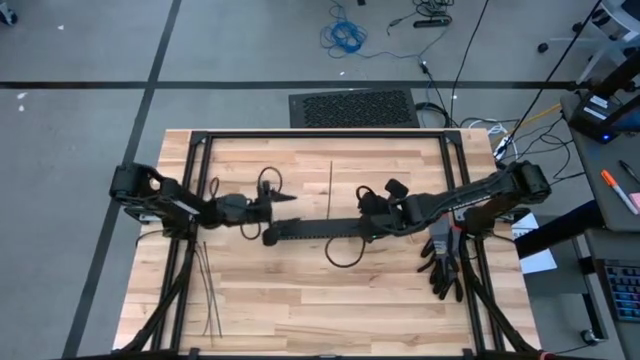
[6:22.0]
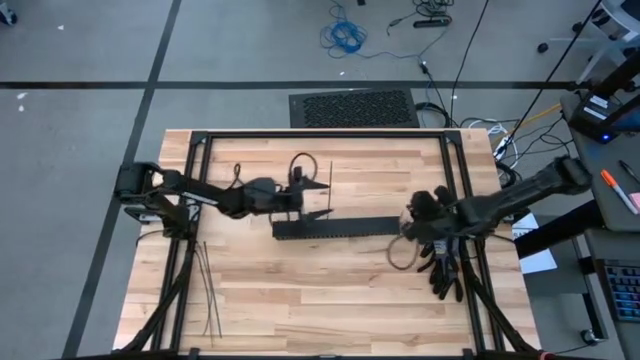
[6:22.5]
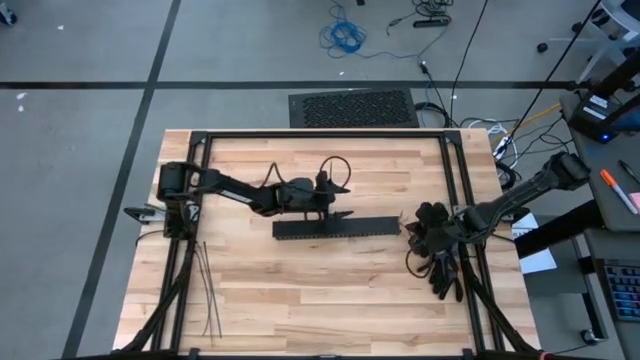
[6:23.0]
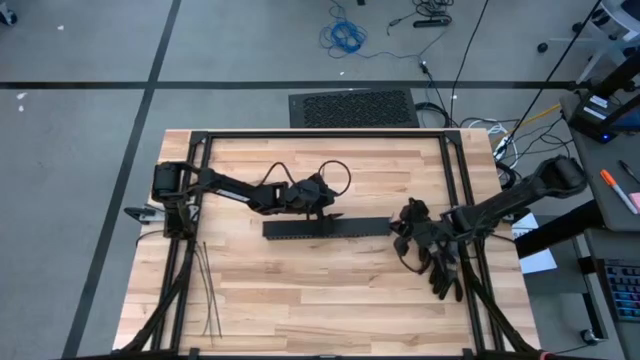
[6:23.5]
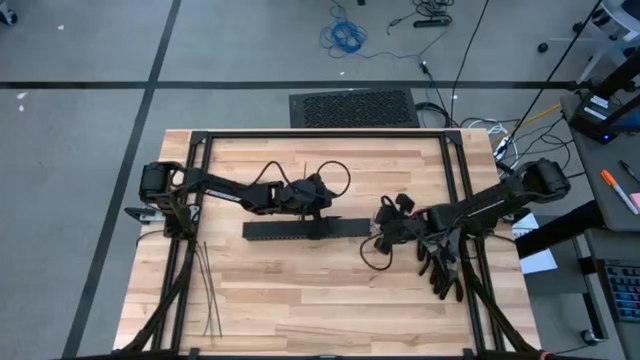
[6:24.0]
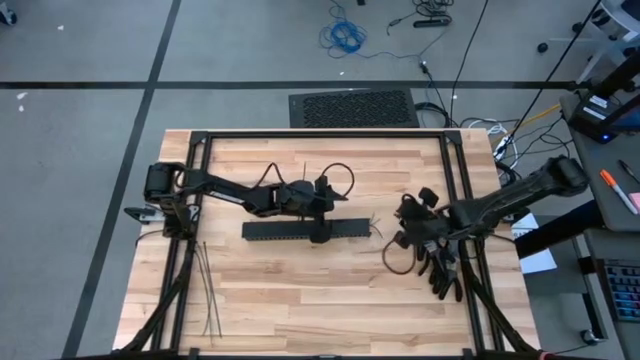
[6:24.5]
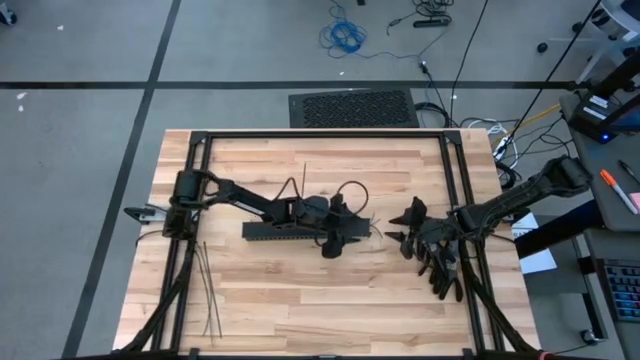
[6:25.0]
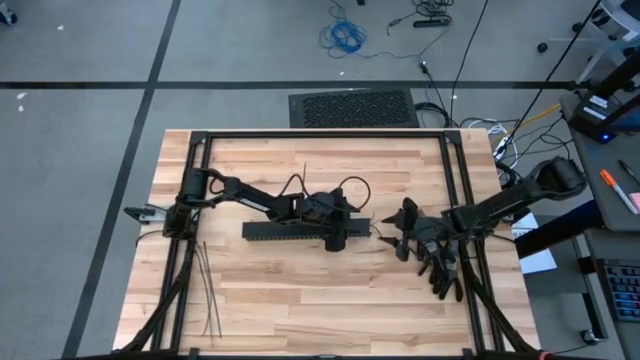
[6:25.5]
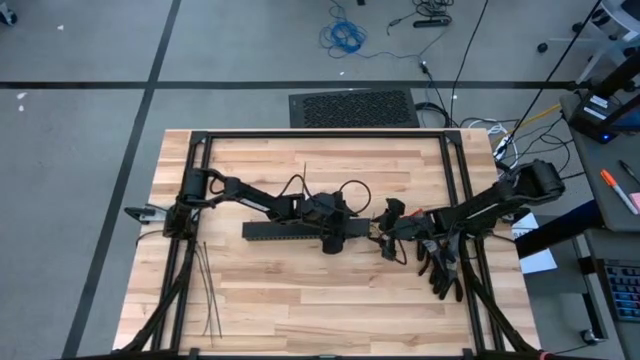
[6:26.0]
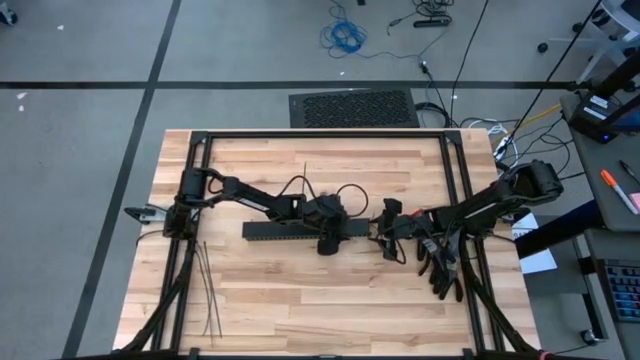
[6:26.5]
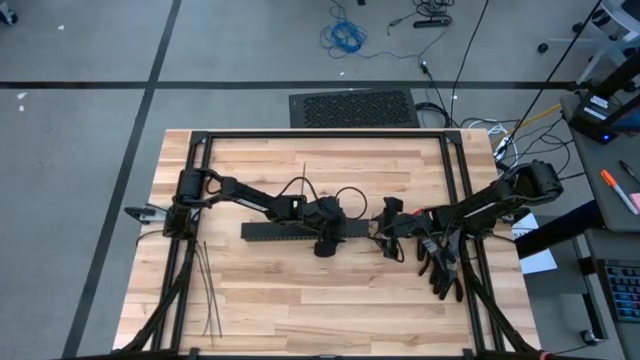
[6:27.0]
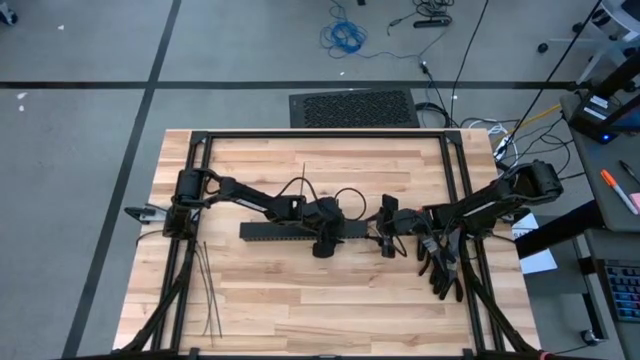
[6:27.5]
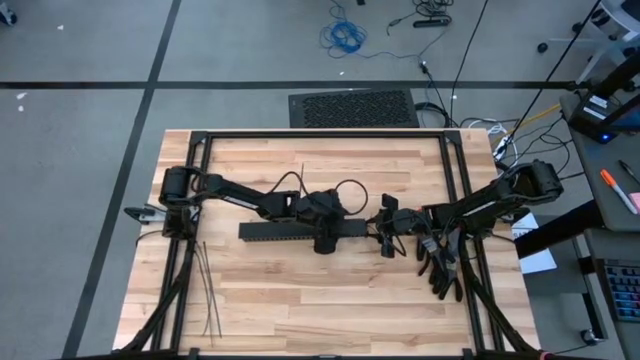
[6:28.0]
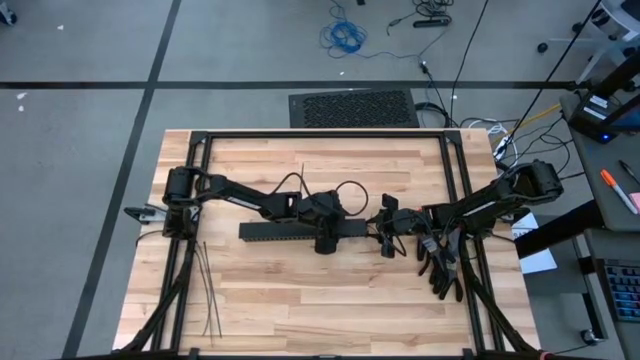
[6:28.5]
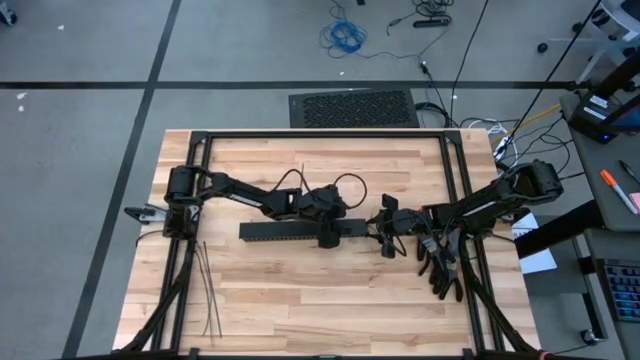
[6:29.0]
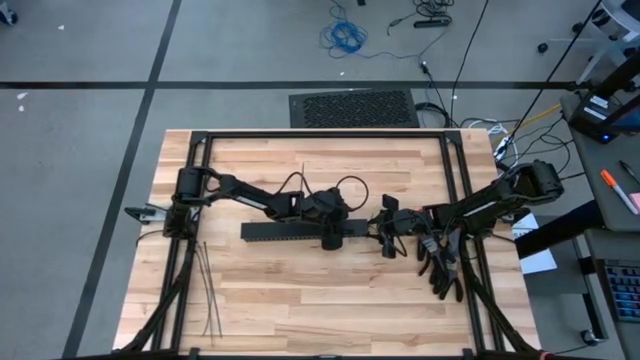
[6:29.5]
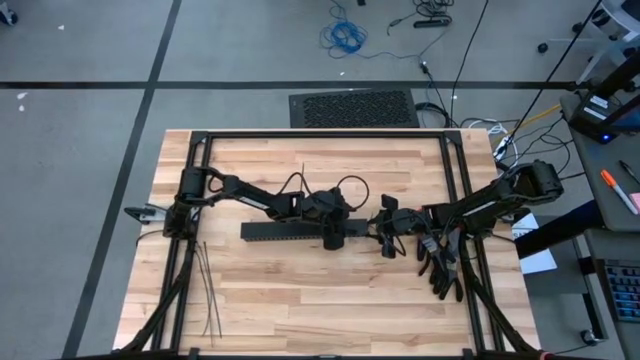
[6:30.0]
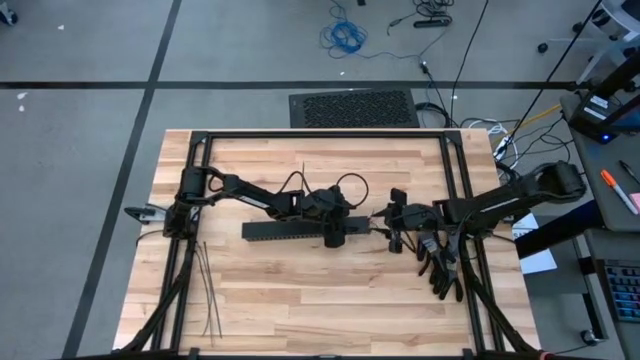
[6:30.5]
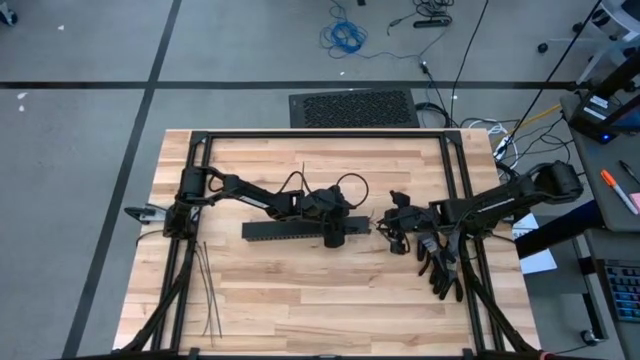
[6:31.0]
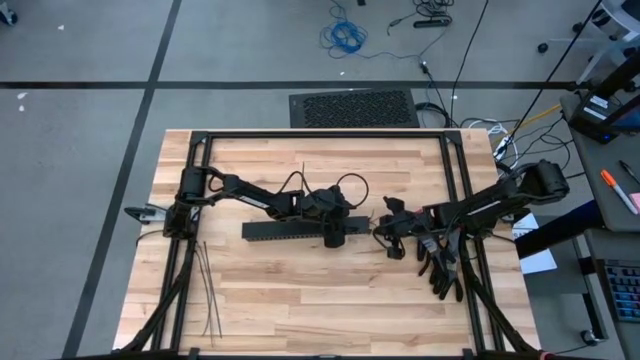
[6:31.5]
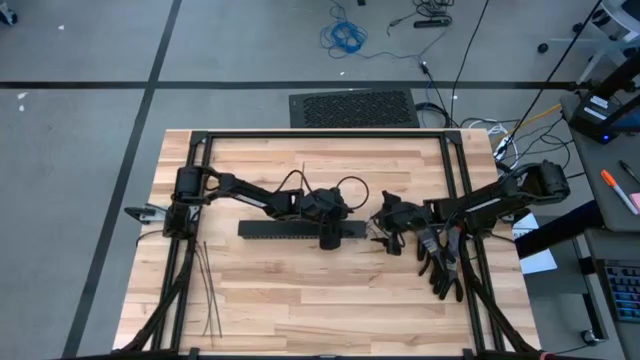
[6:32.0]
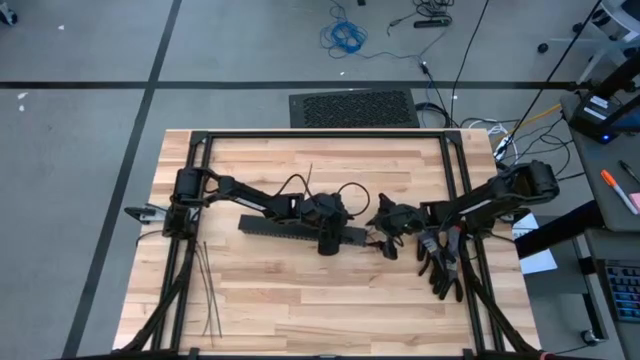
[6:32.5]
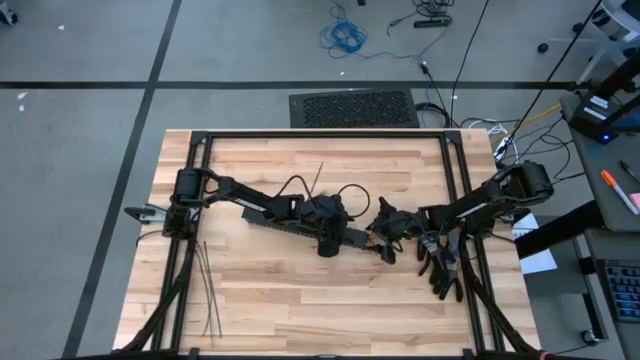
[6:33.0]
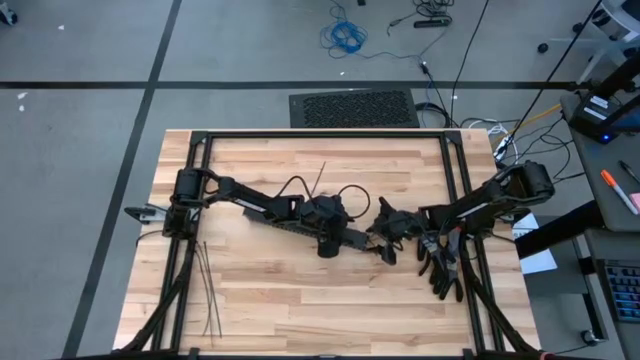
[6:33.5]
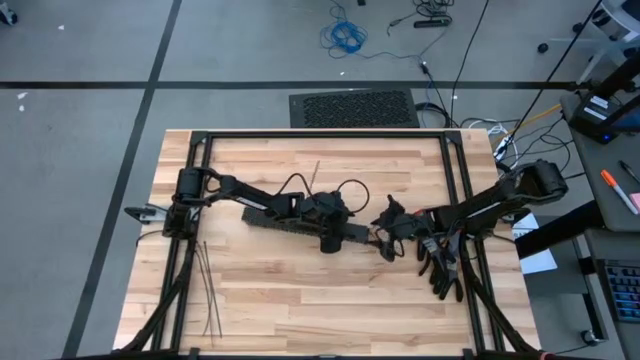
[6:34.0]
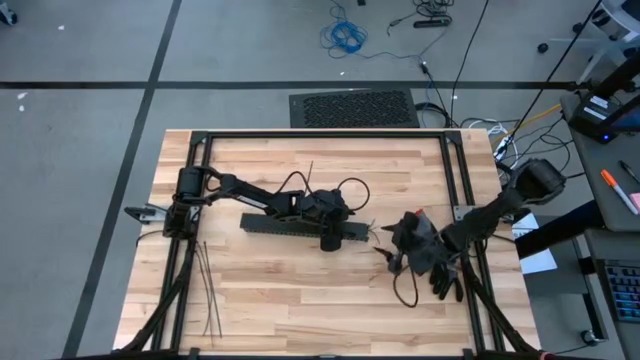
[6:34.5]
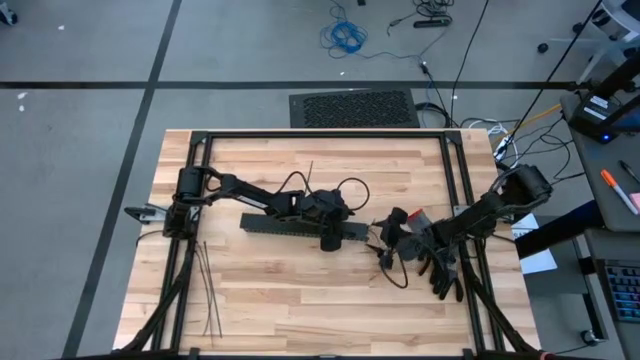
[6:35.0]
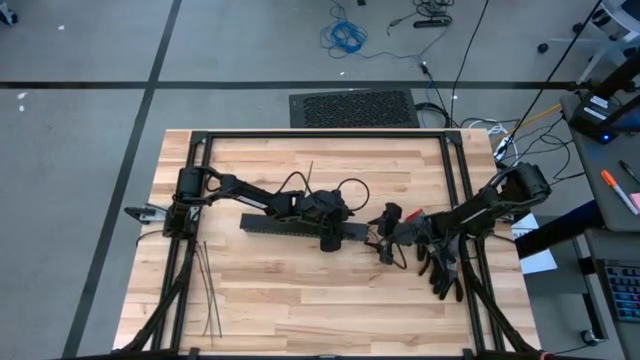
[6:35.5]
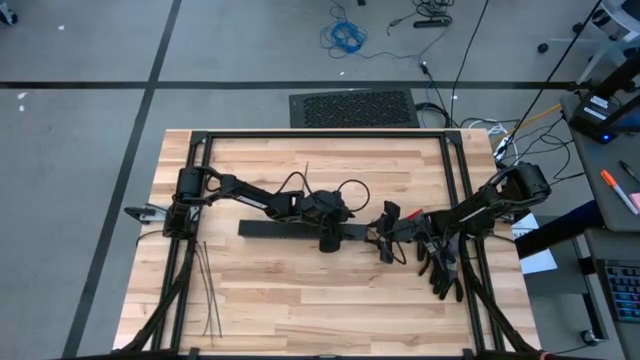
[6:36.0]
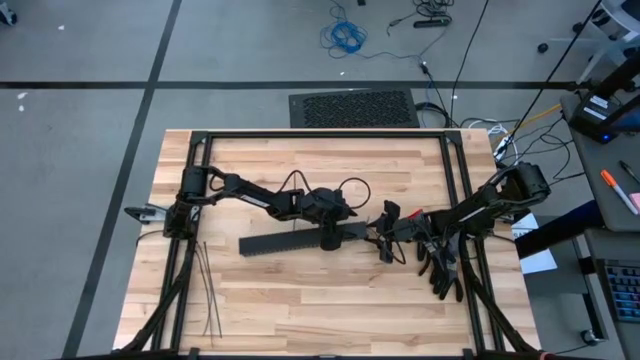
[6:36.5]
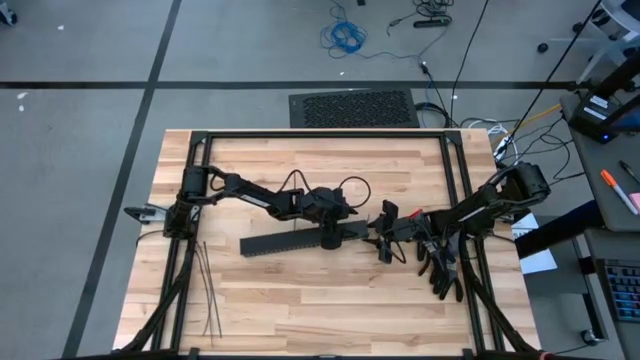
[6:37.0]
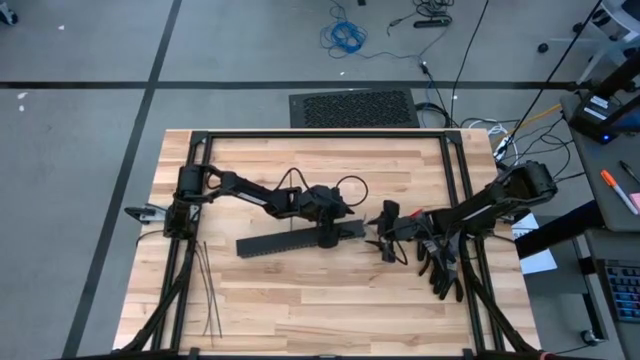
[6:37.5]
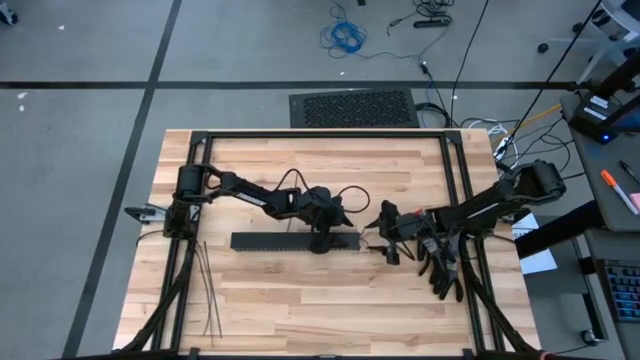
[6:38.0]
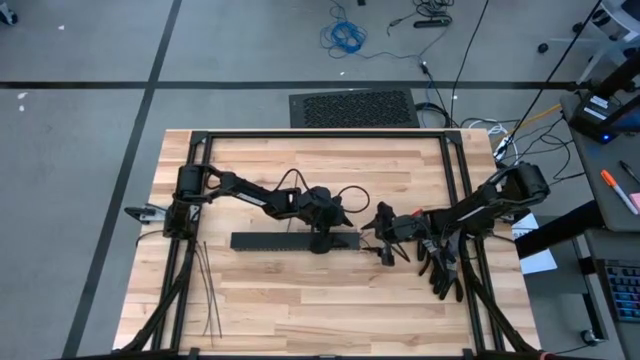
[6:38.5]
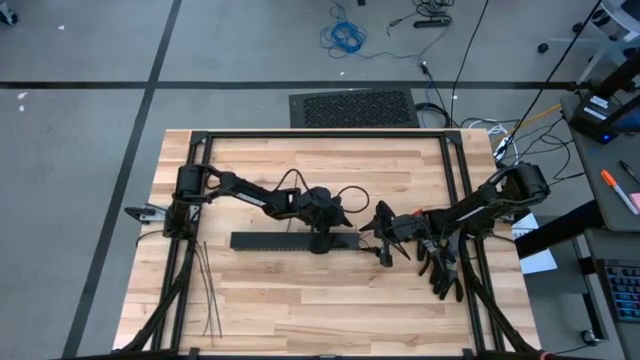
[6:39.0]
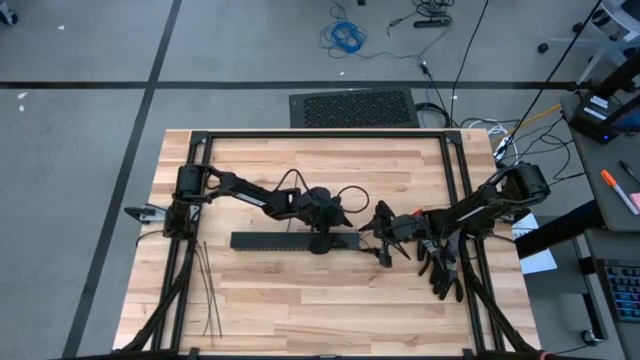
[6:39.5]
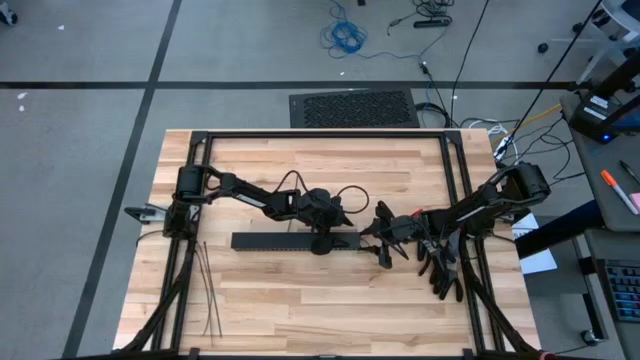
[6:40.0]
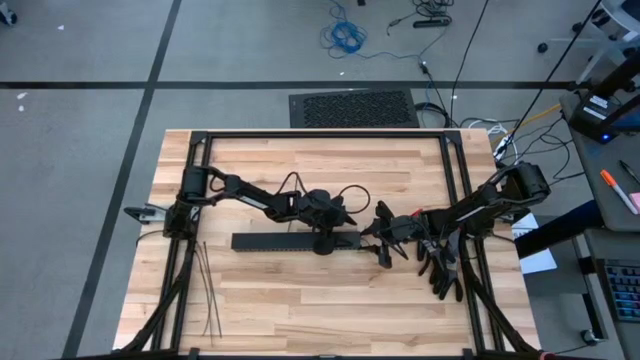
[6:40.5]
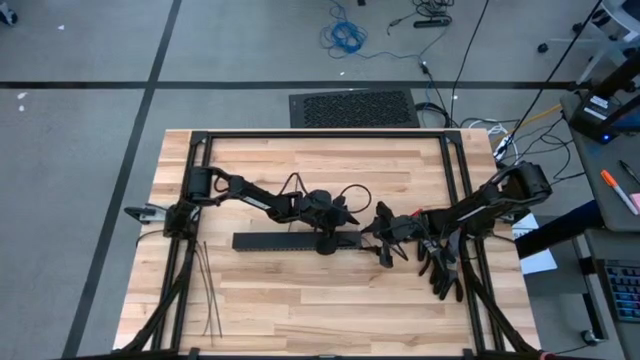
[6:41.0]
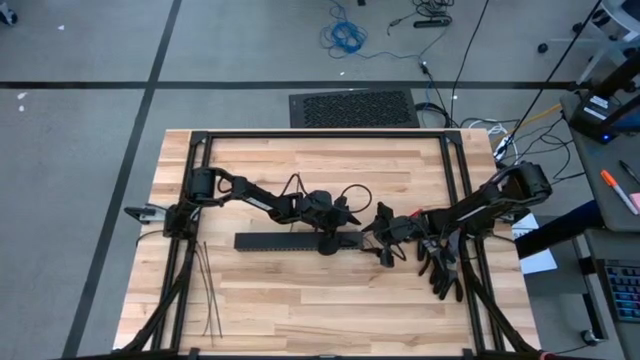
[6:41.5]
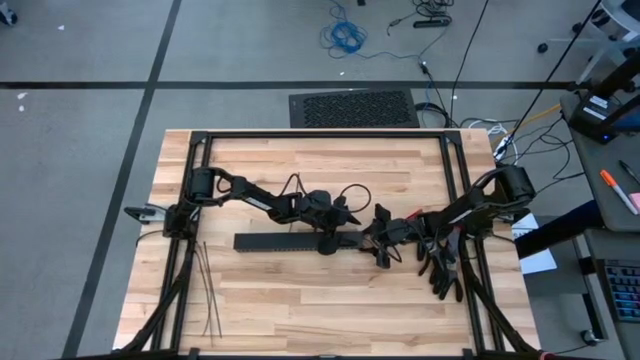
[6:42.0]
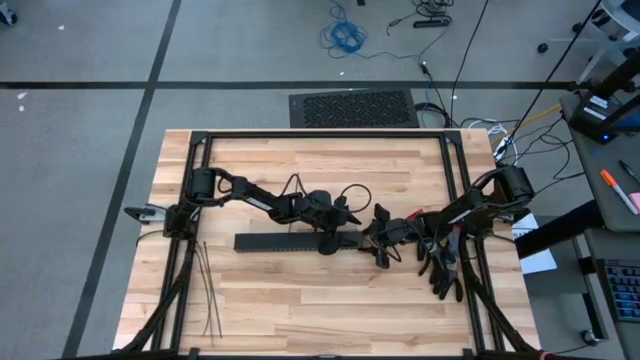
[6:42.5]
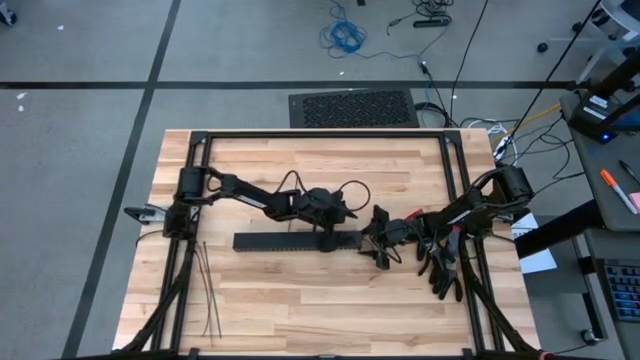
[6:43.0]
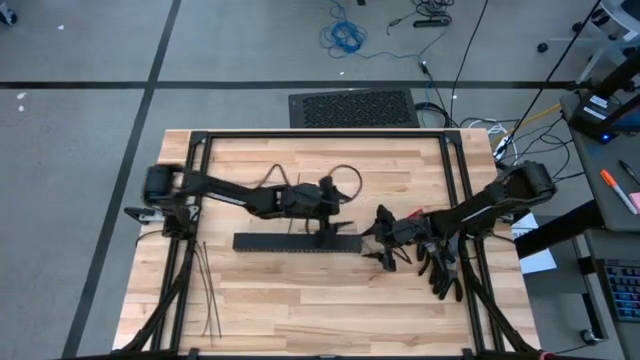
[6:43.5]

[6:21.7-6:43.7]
Task: Ziptie cables
Close the black cable duct
